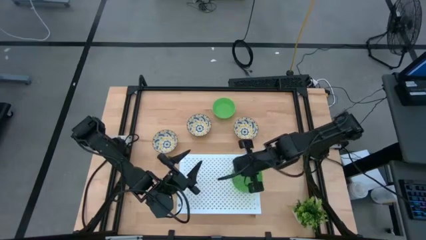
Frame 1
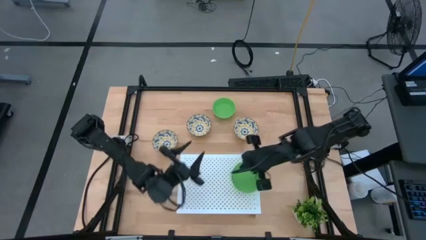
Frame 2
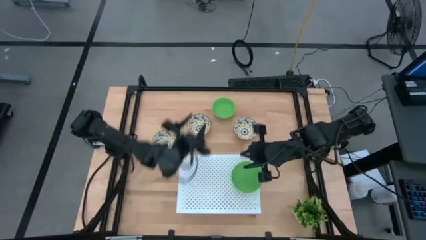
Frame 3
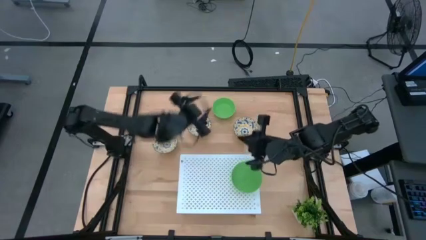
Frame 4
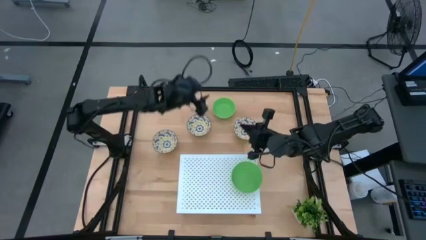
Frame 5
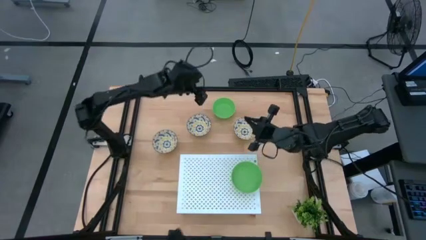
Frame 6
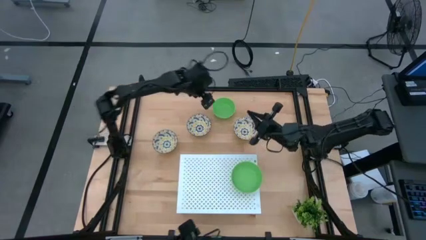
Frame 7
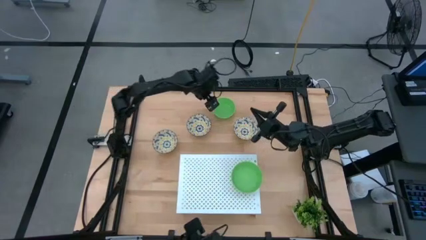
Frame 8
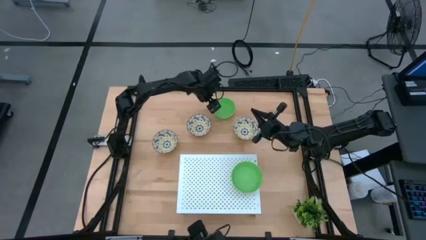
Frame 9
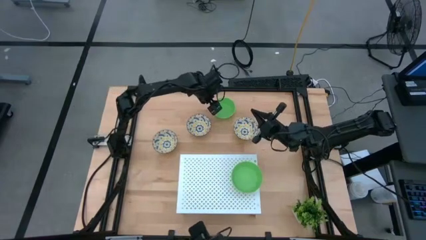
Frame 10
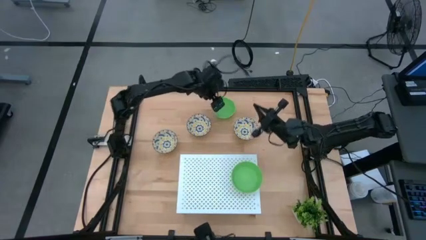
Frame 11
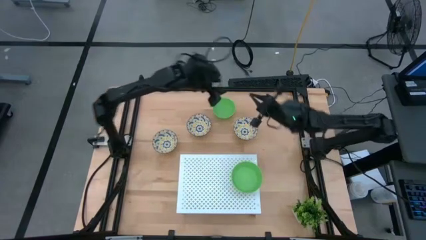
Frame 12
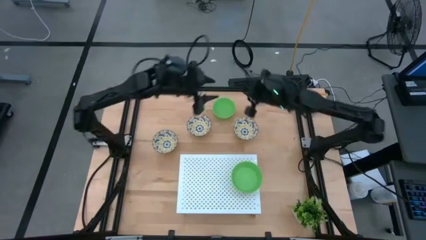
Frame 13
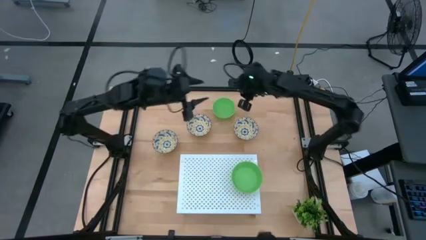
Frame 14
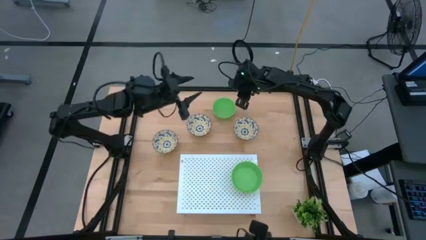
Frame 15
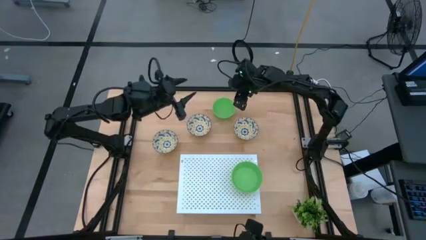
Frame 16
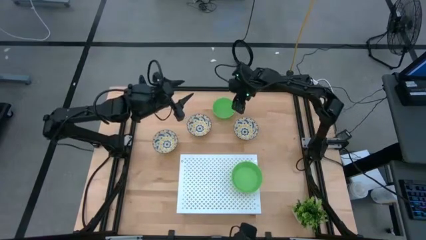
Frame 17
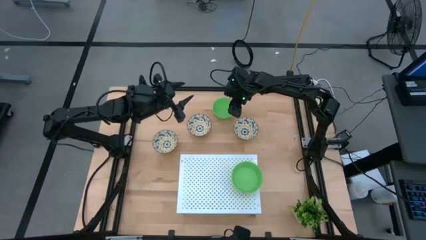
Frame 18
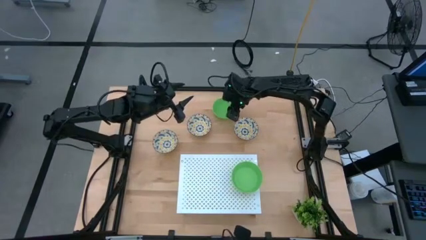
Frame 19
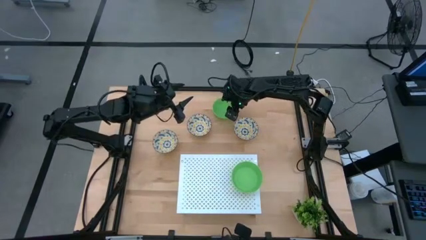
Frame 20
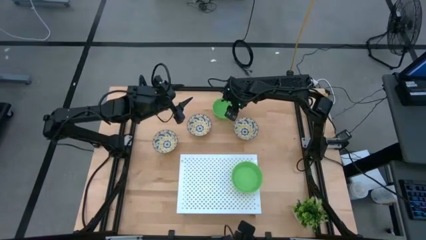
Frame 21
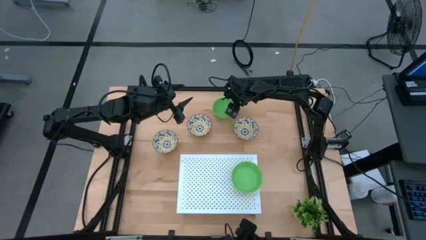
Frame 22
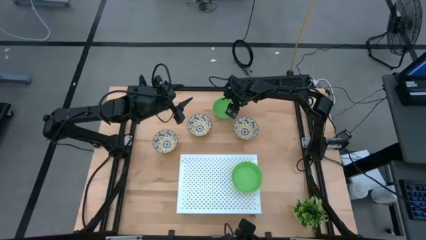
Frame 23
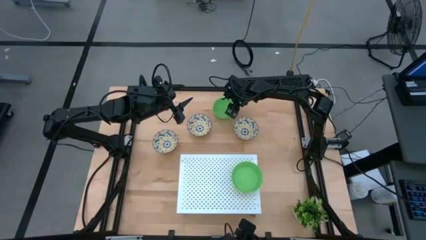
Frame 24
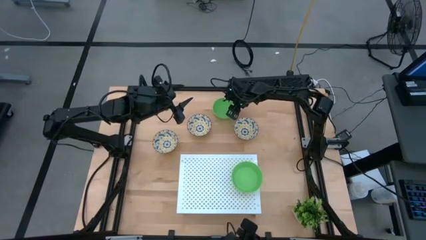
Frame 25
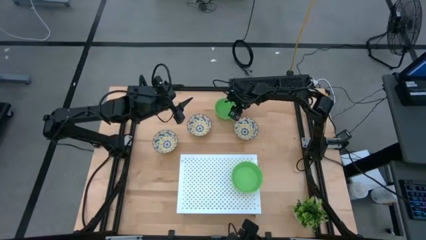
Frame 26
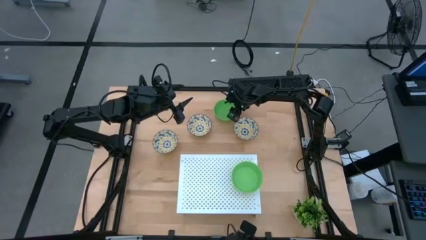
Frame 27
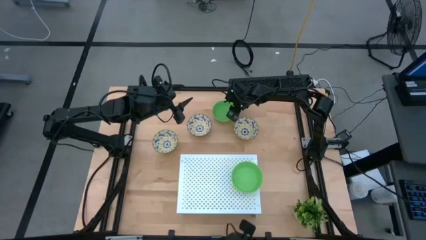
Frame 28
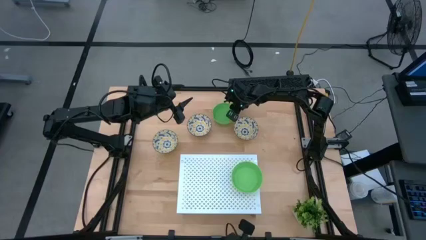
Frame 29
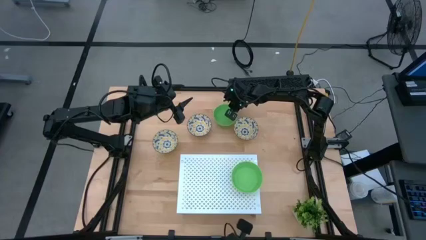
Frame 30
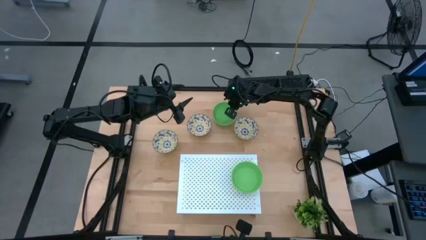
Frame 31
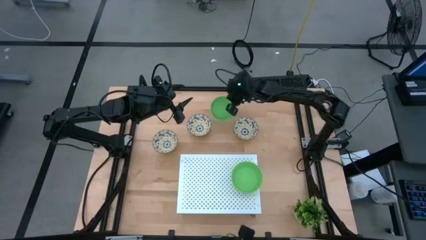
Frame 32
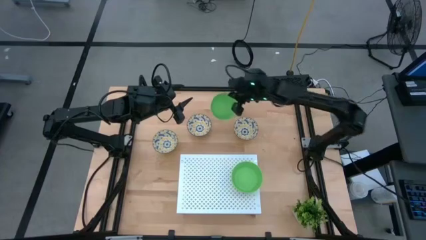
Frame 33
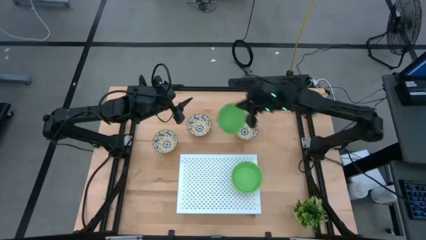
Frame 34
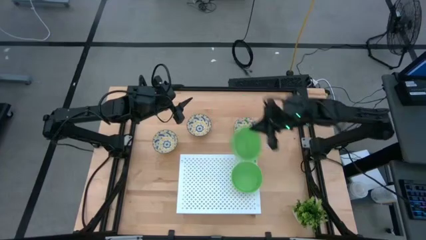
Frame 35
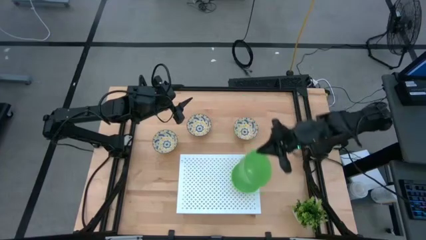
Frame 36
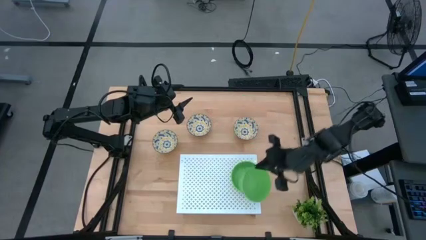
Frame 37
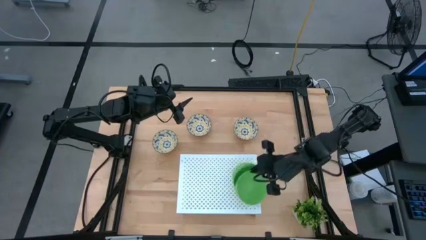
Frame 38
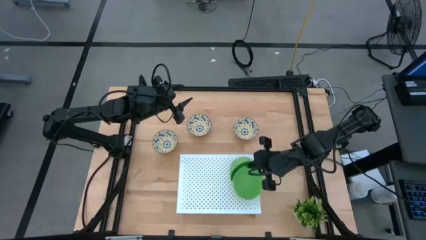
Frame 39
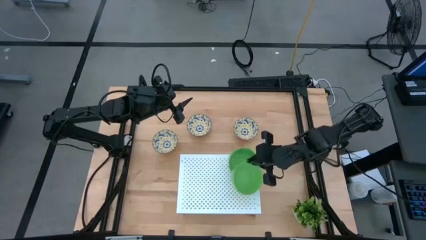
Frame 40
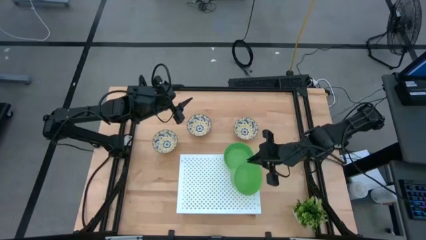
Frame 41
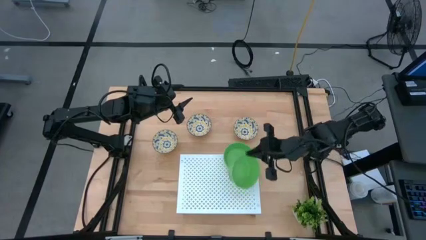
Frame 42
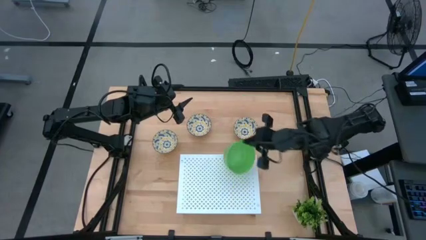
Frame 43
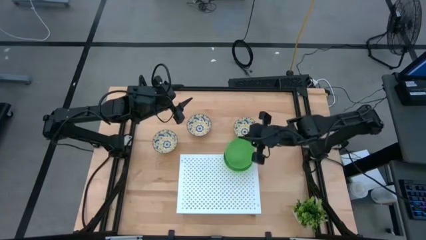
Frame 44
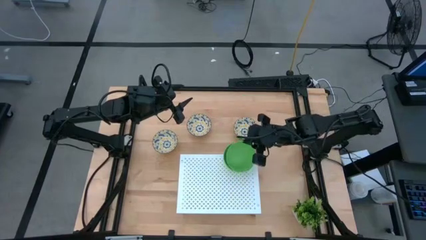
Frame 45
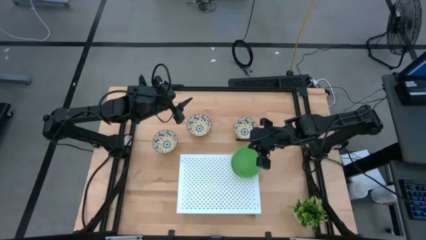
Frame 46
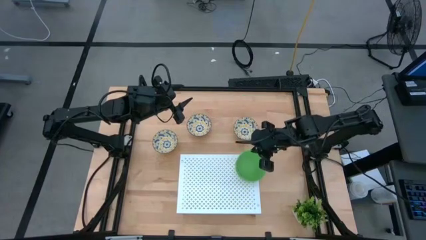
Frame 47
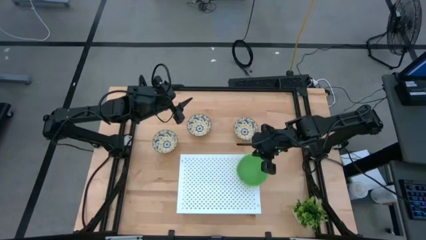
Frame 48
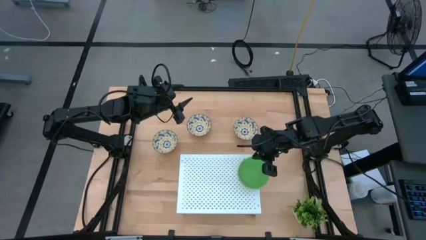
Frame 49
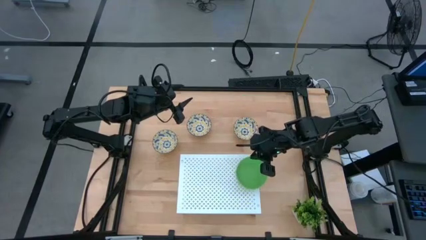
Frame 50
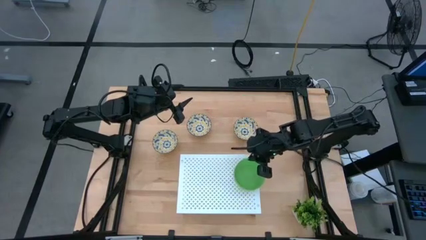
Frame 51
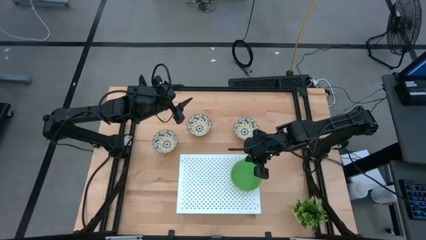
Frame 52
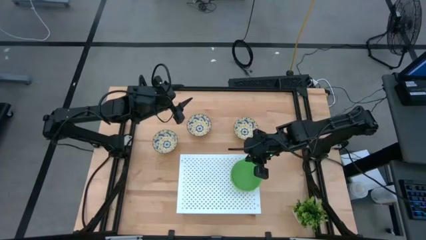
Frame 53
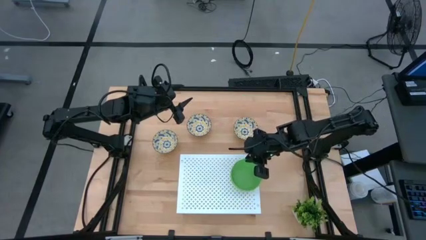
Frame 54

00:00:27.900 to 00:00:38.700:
Task: Pick & Place Mini bowls
Stack the green bowl on top of the green bowl on the shelf
